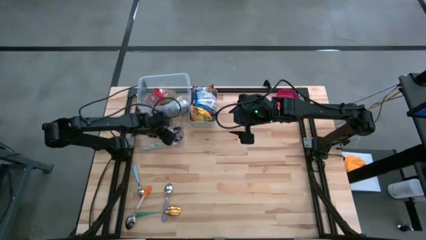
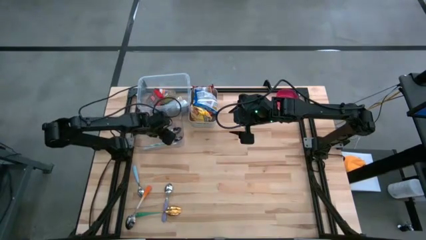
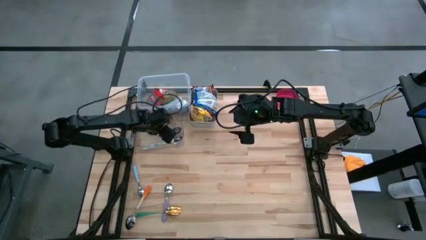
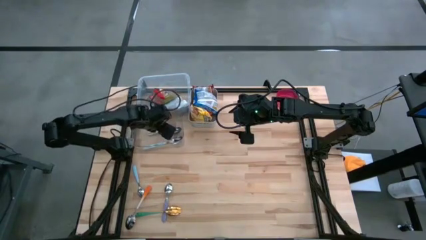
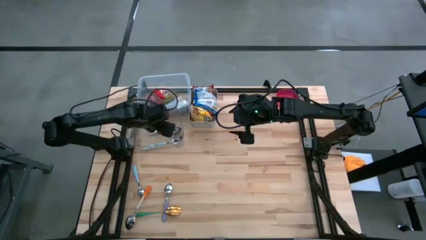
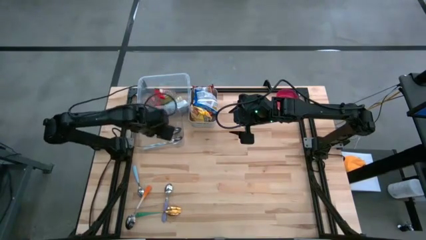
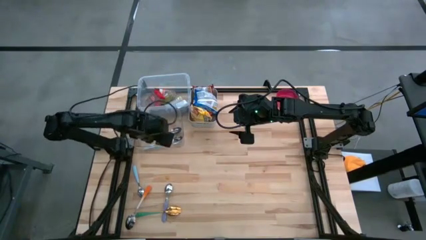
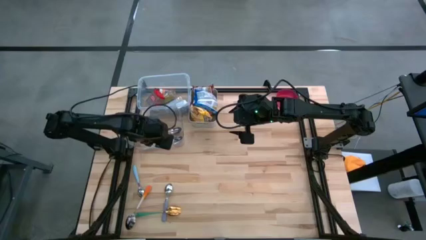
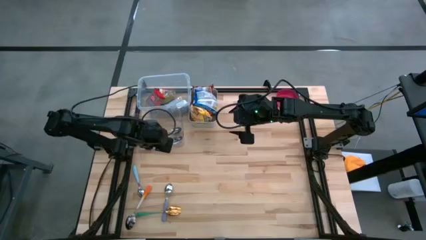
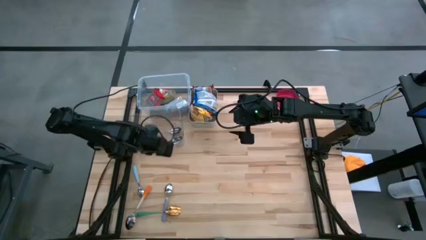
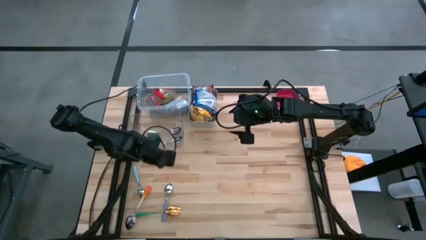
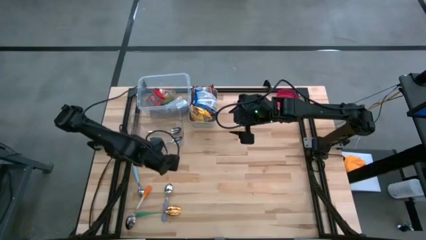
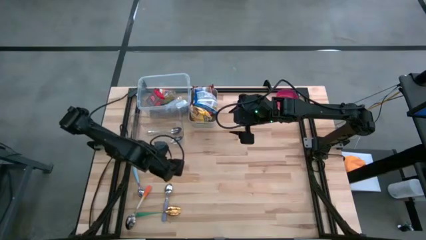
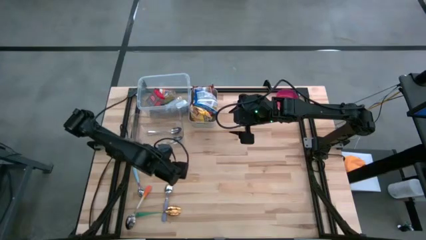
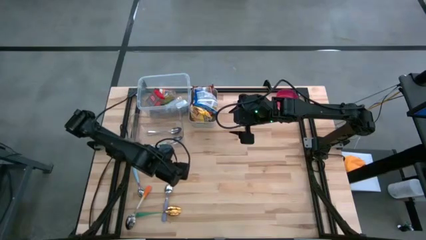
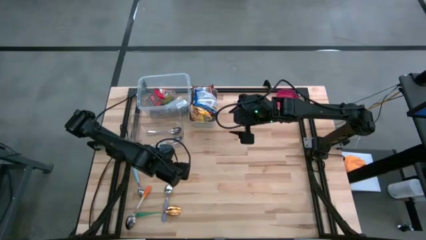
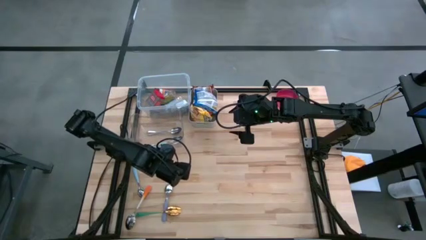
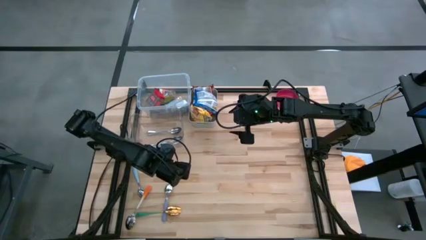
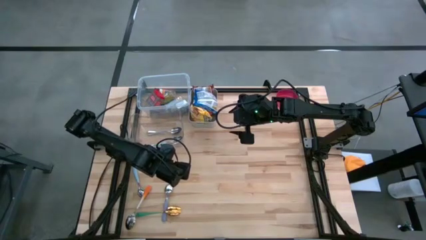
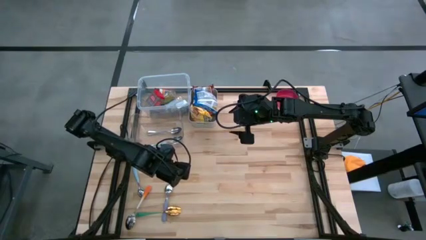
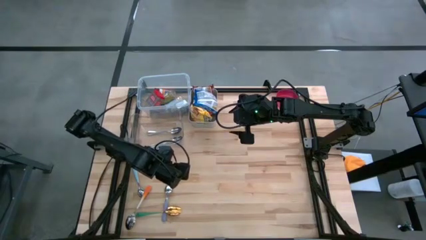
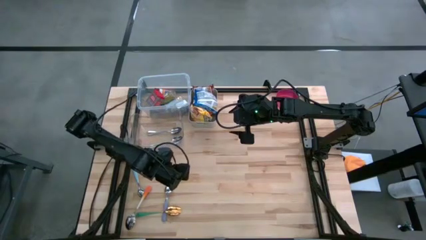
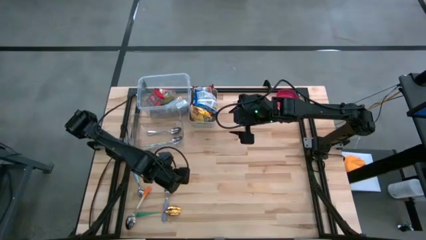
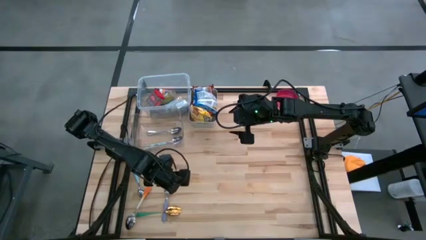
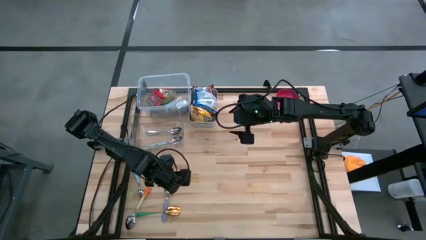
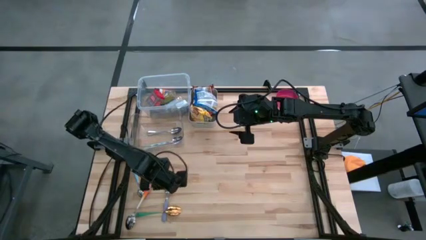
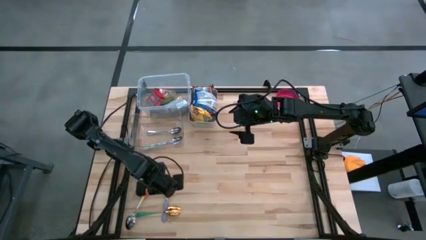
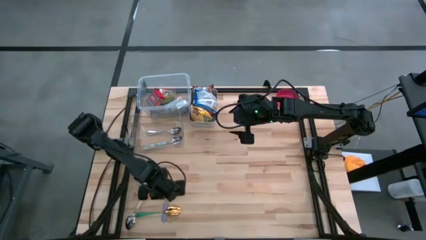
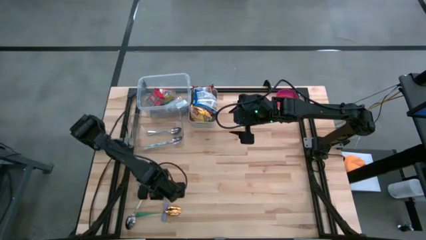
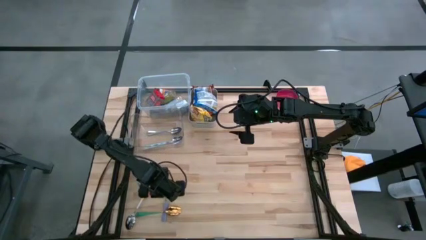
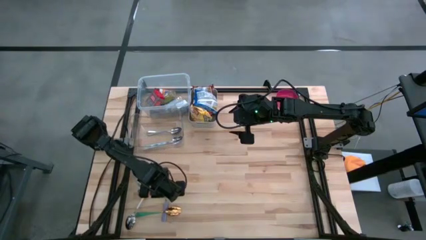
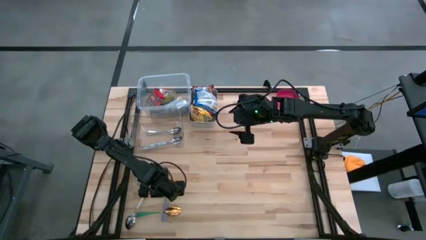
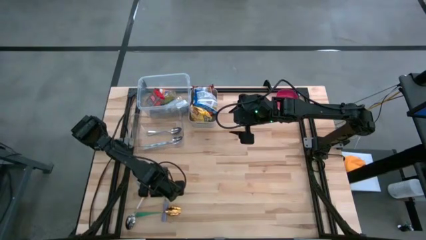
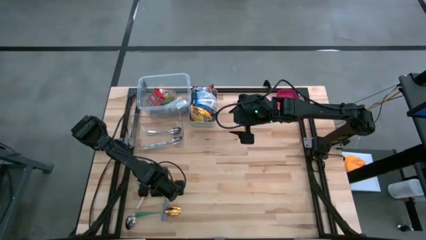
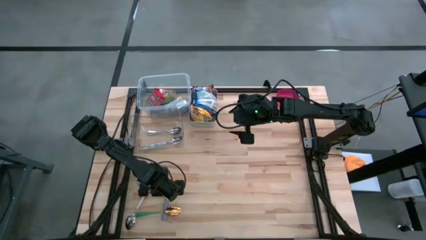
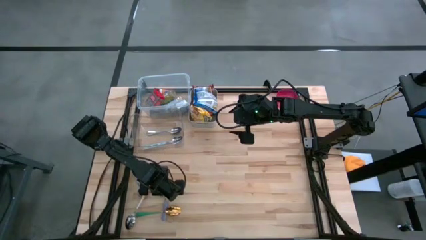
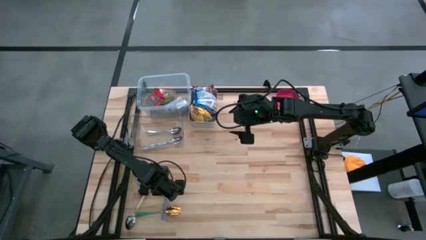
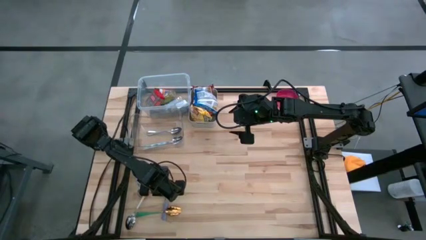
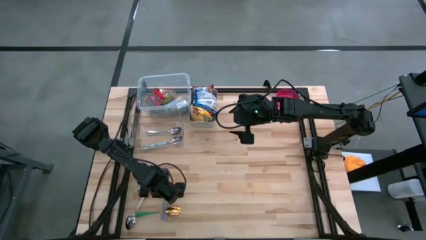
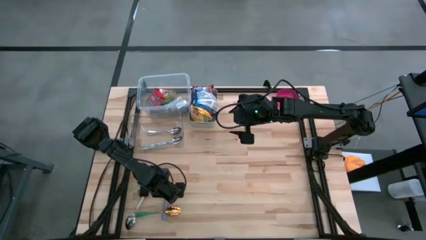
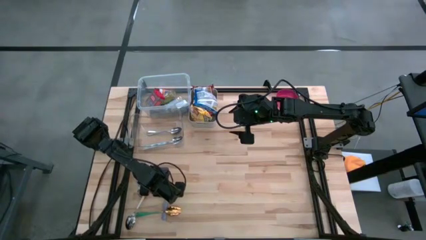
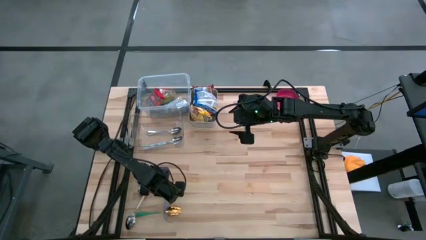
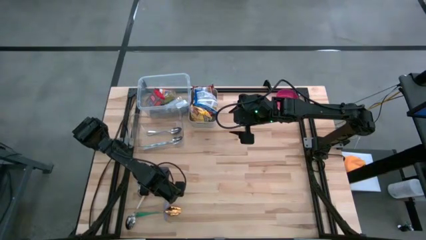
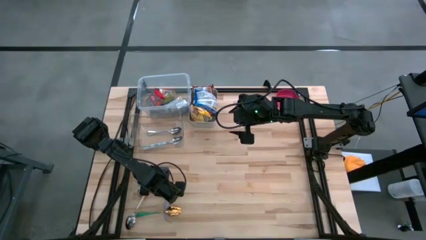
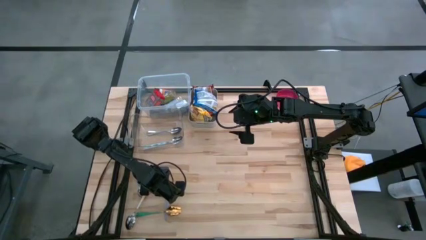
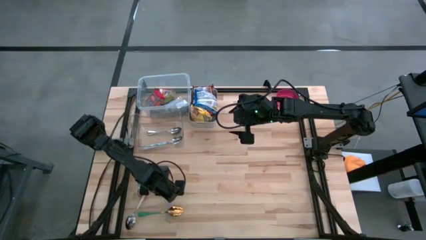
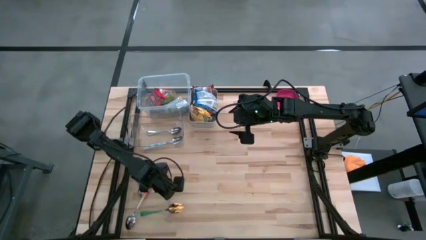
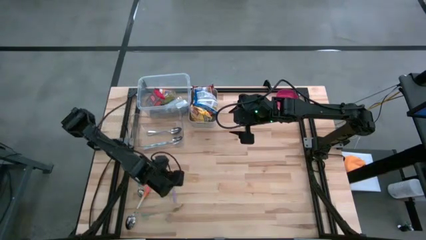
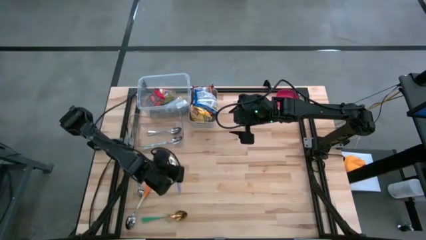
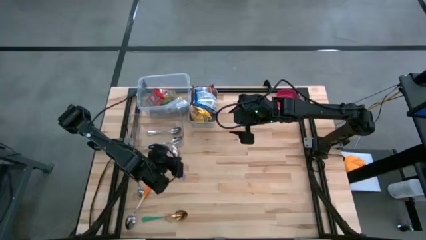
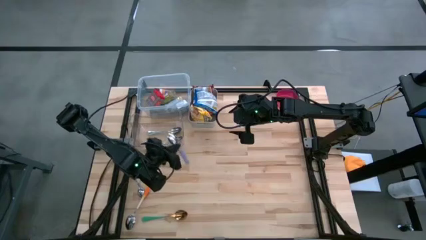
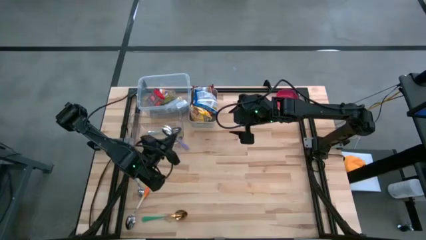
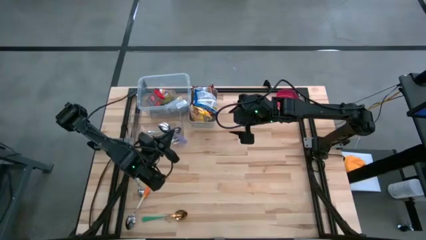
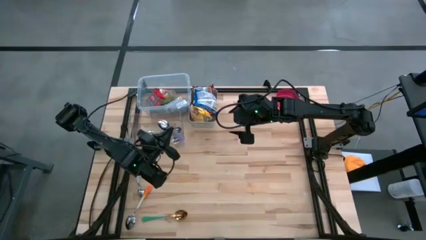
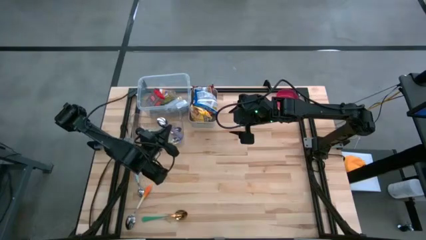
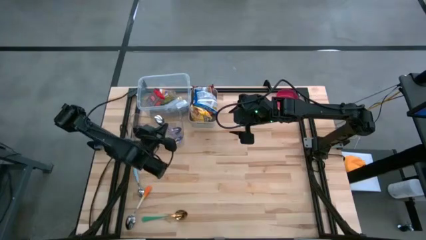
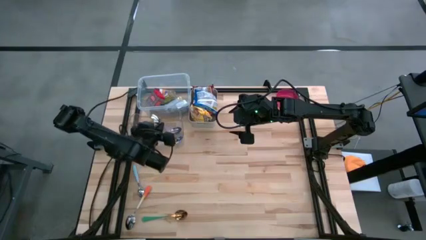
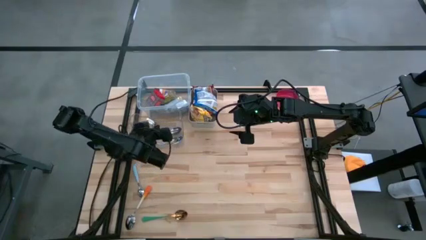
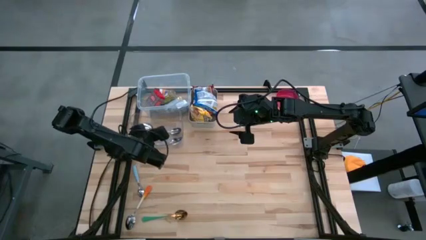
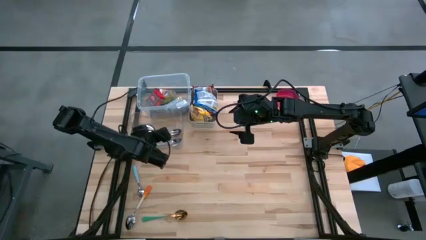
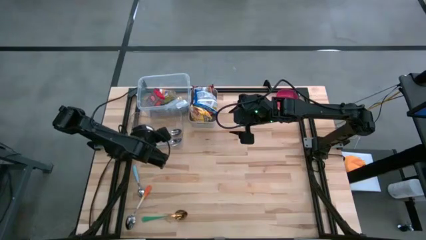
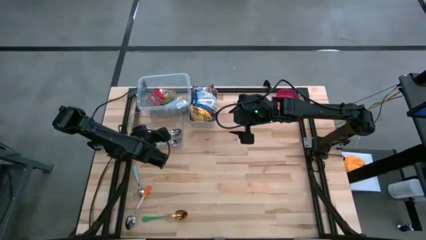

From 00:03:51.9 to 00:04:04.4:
Put the purple spoon into the transparent bin
